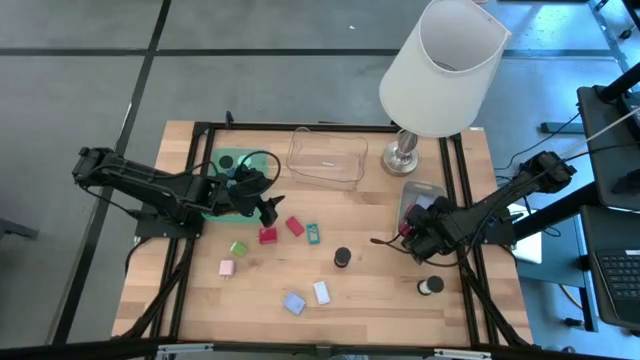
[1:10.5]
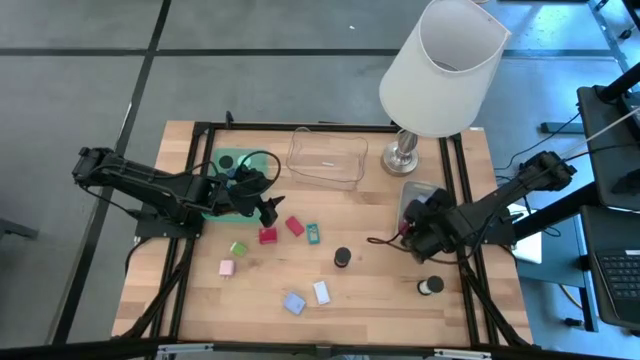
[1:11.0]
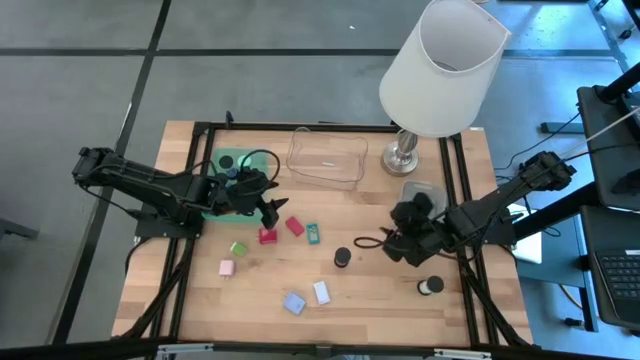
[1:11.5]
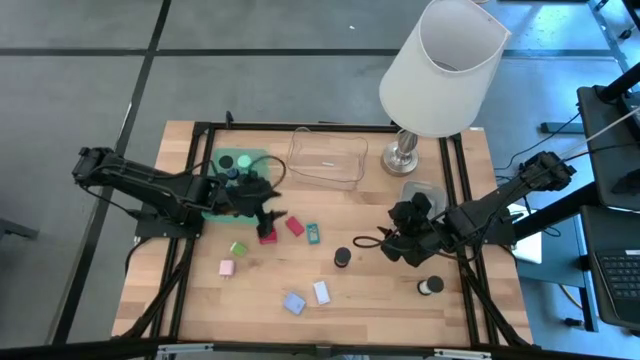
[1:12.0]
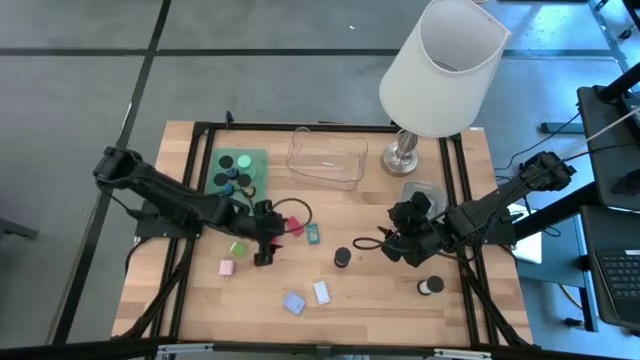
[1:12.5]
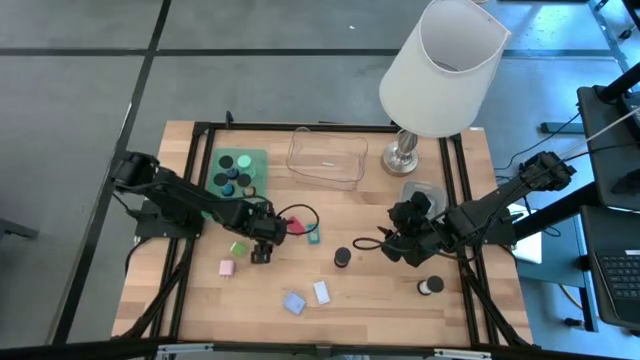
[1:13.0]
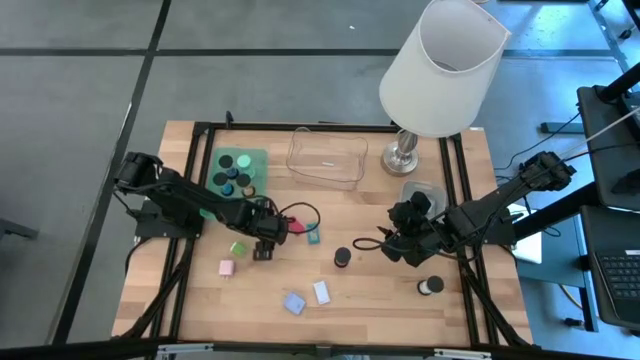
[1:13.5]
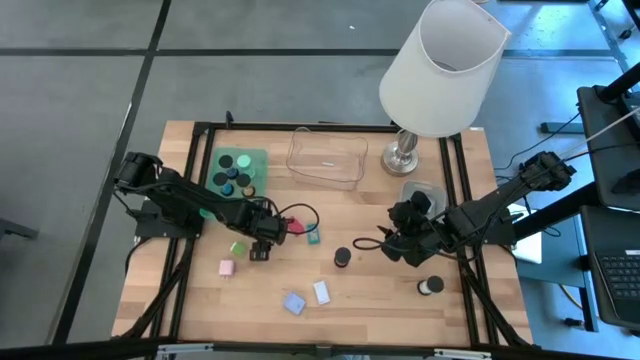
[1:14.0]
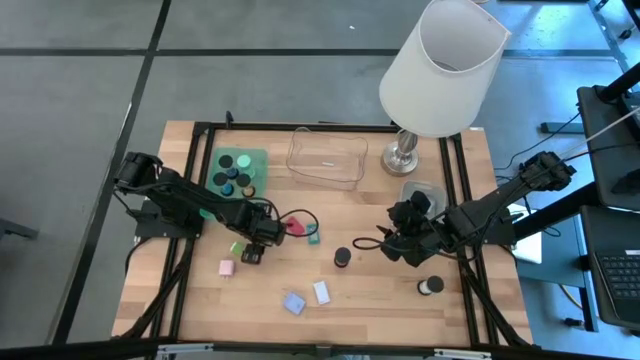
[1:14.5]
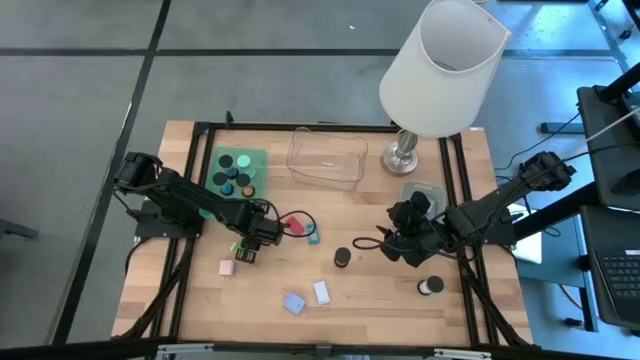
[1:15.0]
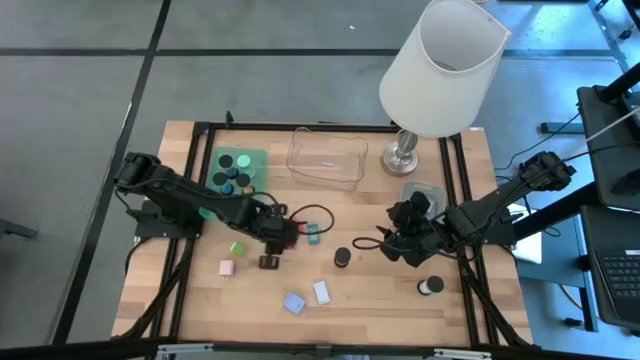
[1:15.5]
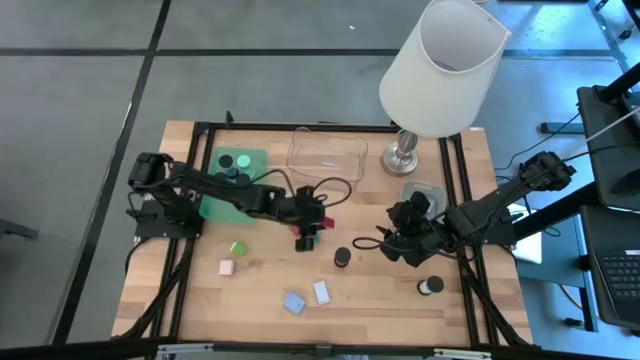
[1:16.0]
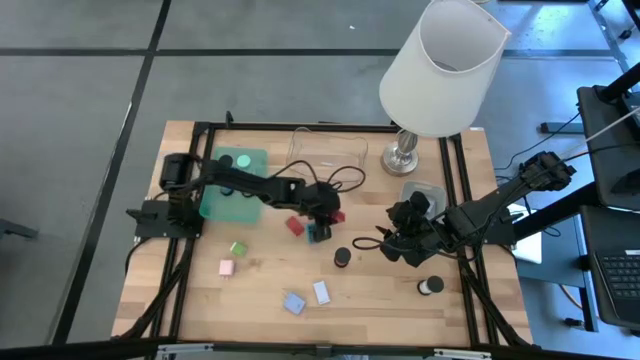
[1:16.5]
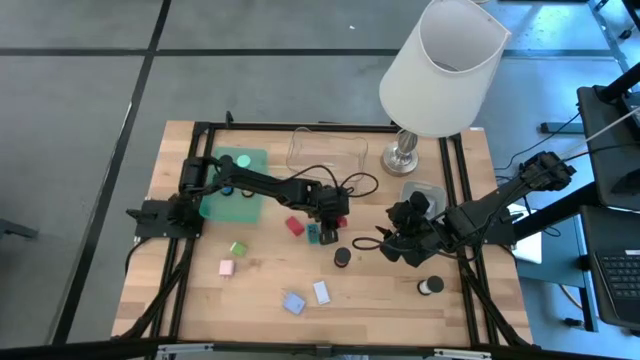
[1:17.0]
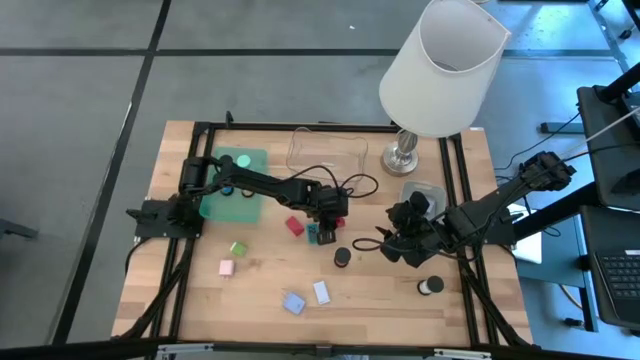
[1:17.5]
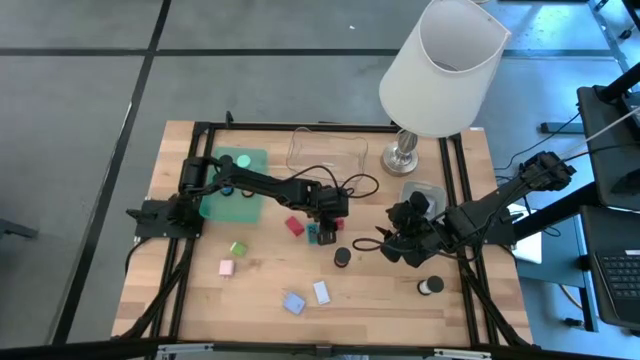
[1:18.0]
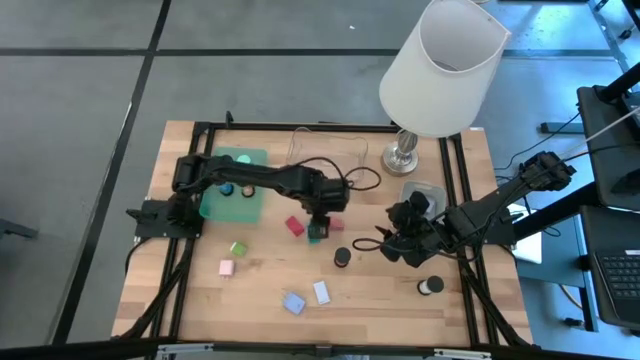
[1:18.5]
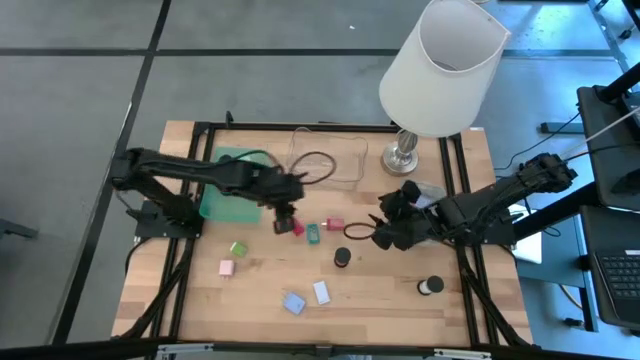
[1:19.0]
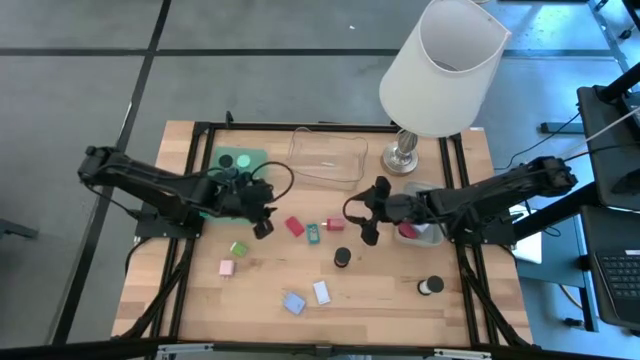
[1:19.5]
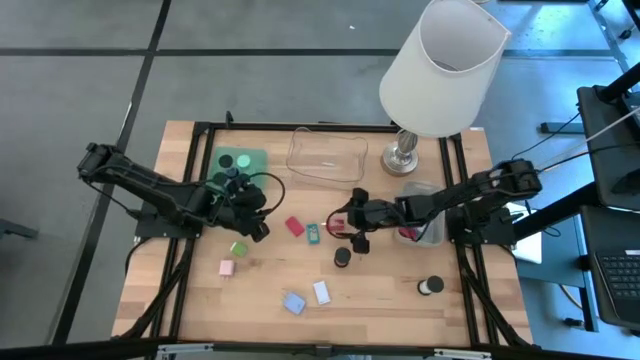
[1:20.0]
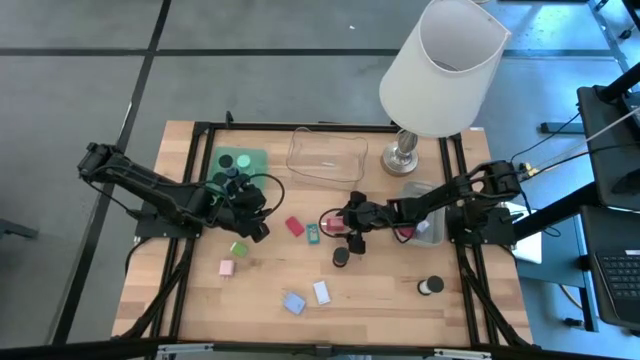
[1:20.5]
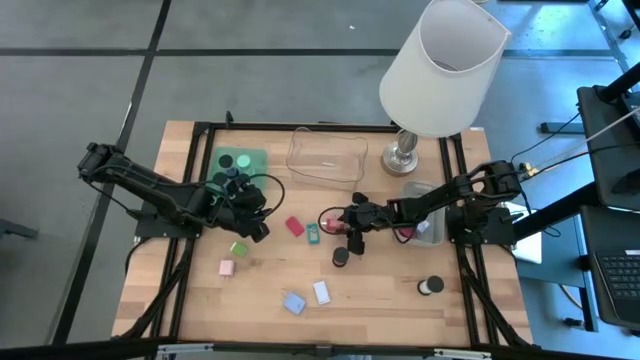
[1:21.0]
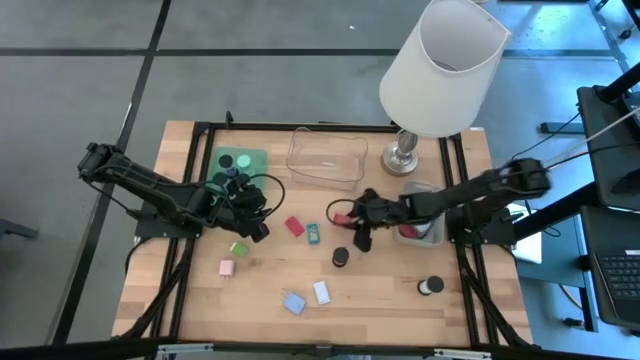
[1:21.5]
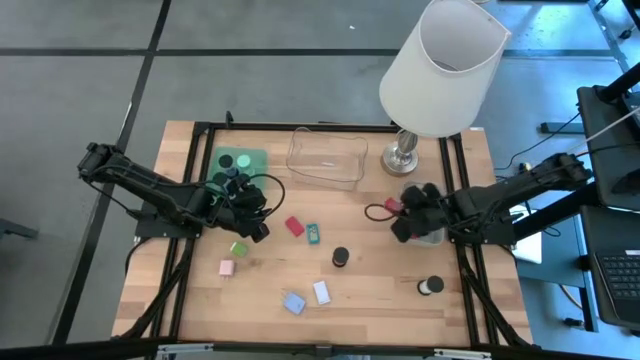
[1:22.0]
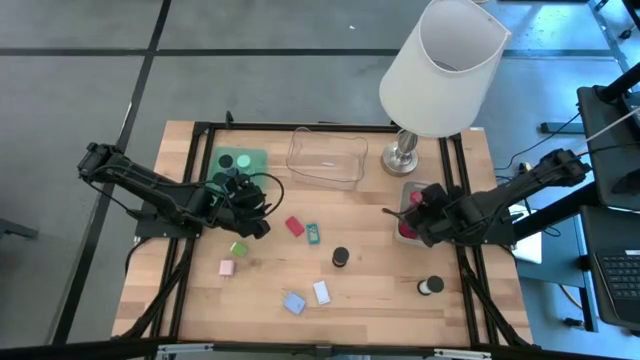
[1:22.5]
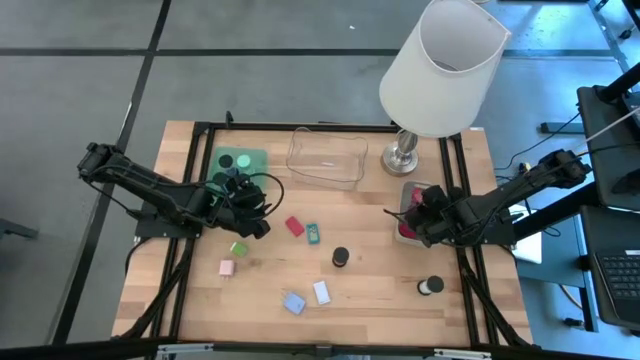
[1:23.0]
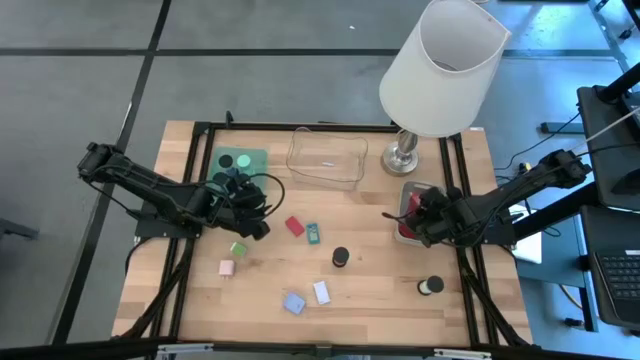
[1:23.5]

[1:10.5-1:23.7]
Task: Pick & Place Office items
Put the red charger adapter into the gray bin

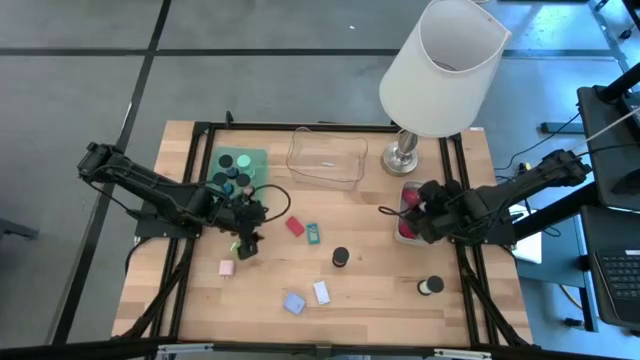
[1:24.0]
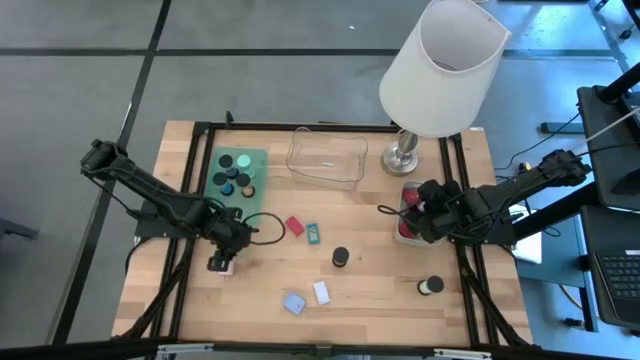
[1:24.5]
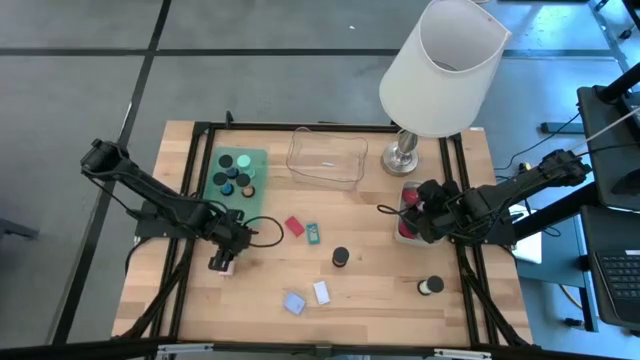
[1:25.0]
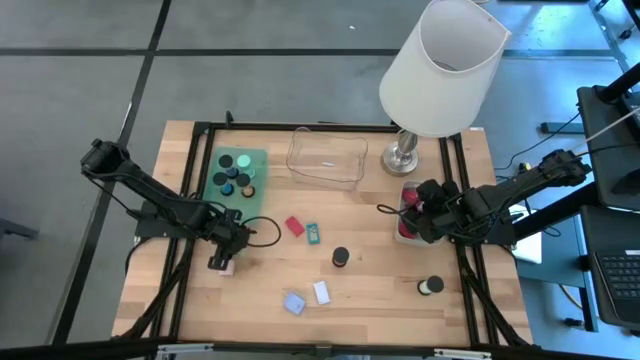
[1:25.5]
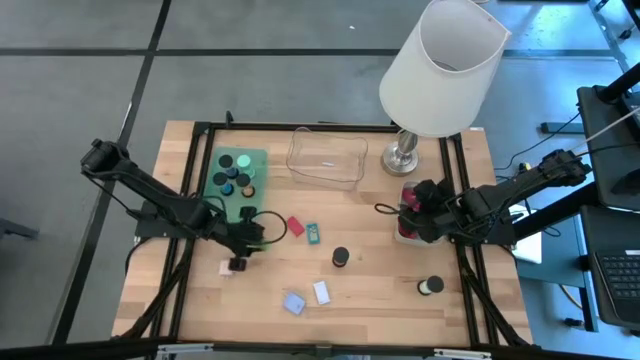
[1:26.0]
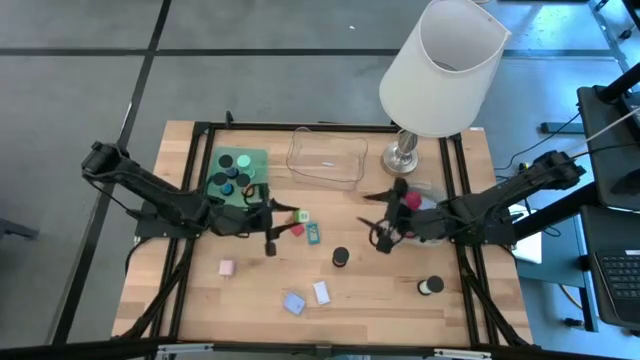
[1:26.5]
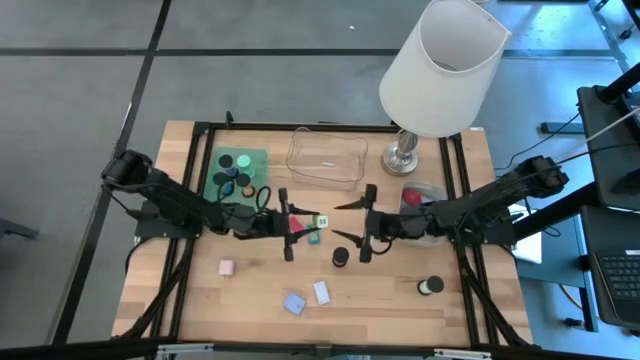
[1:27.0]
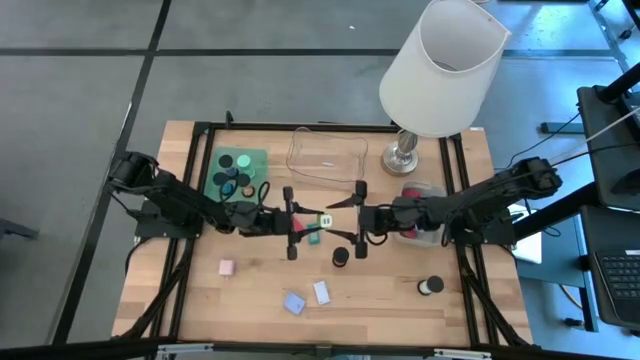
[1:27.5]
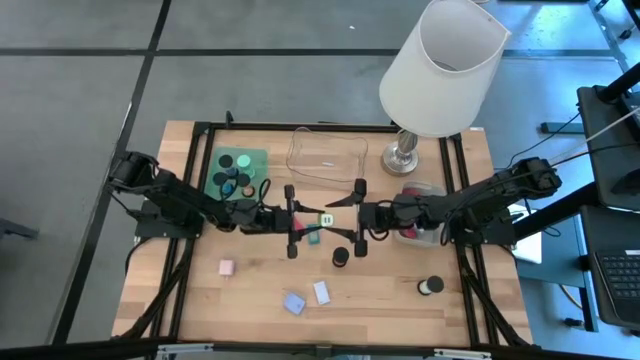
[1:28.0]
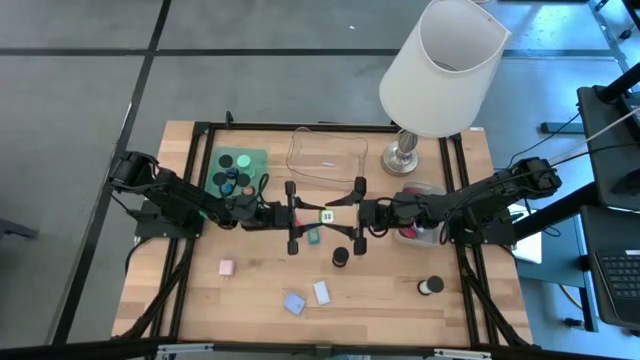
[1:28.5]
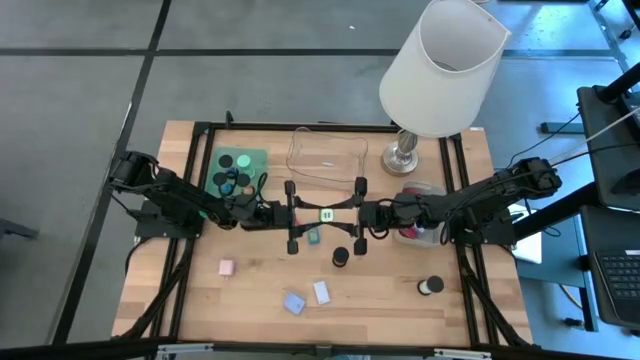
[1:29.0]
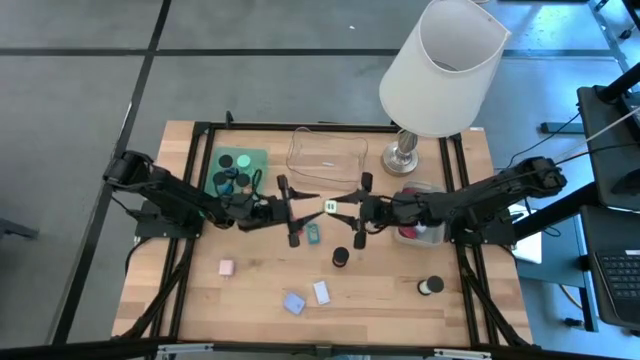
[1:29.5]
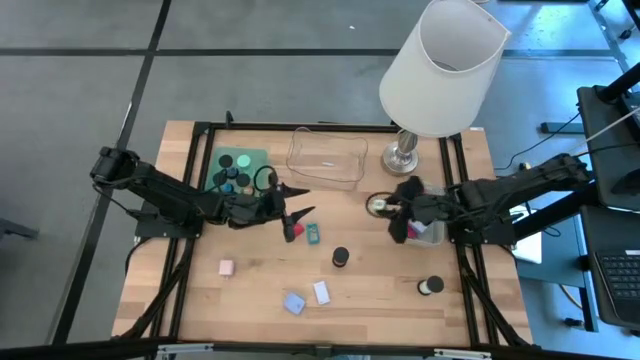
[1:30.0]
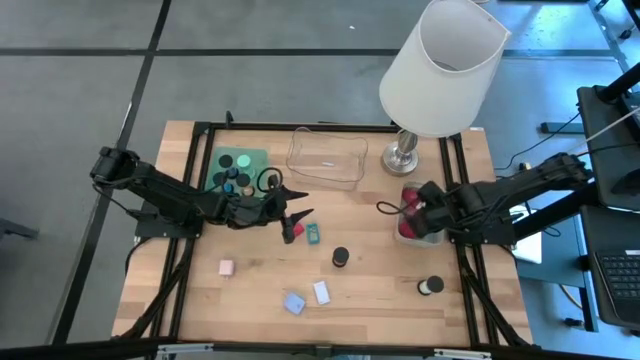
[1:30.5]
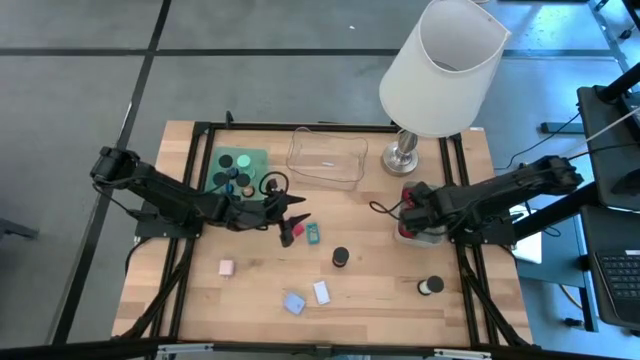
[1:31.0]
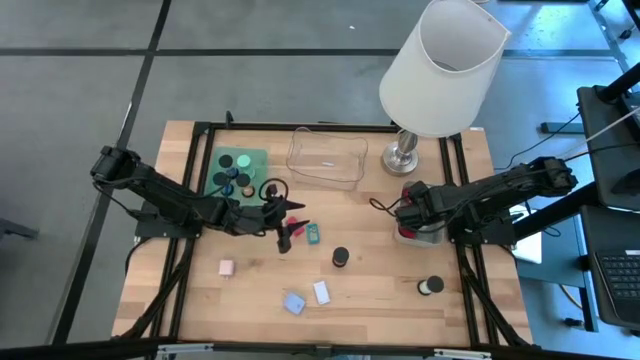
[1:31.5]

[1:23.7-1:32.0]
Put the green charger adapter into the gray bin

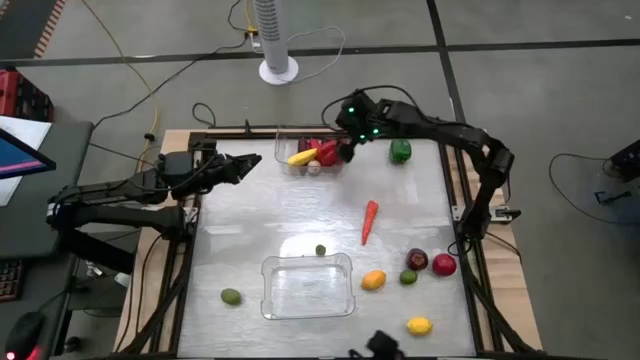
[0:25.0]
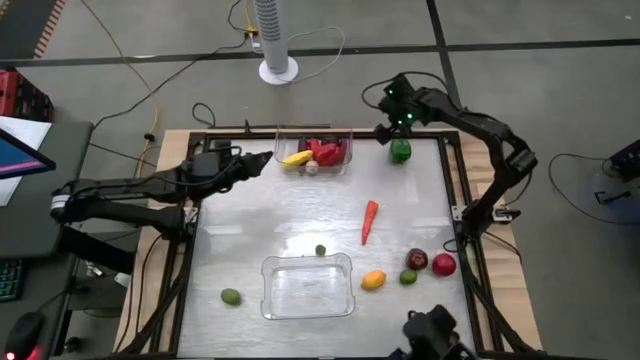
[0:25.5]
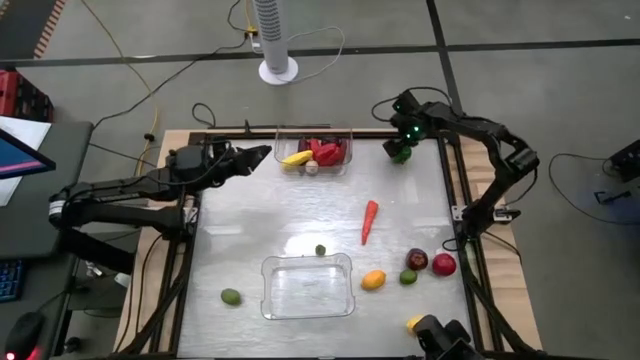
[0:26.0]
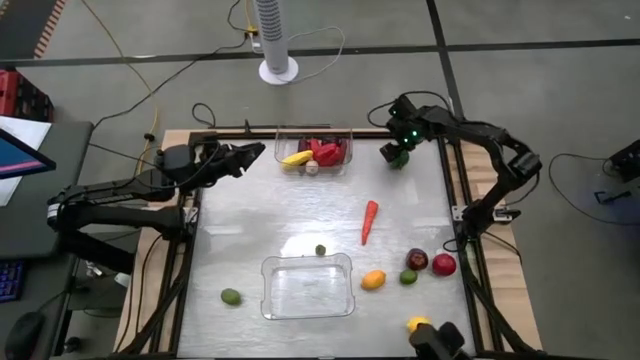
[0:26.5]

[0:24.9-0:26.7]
Task: Sort produce into baskets
Put the green bell pepper into the top transparent bin
